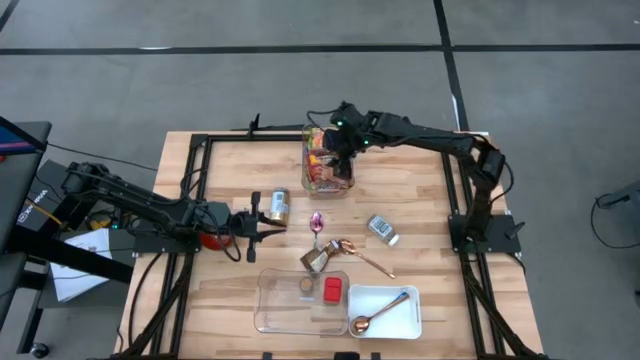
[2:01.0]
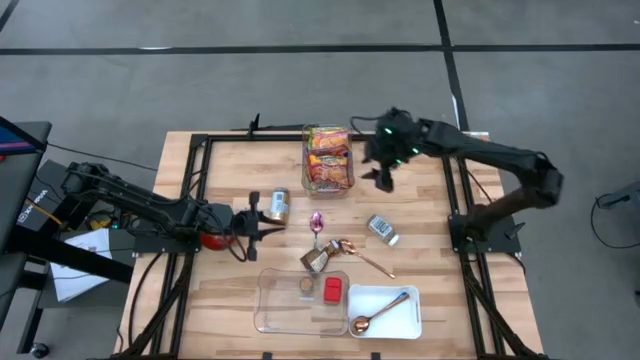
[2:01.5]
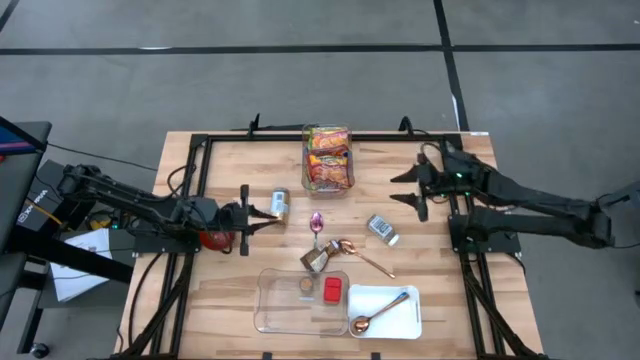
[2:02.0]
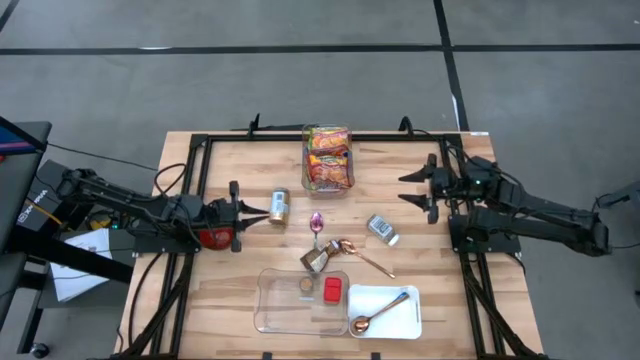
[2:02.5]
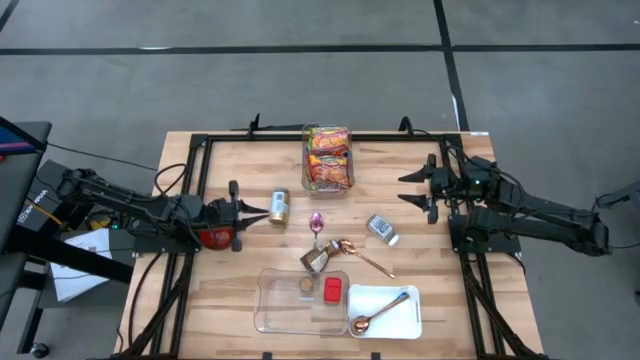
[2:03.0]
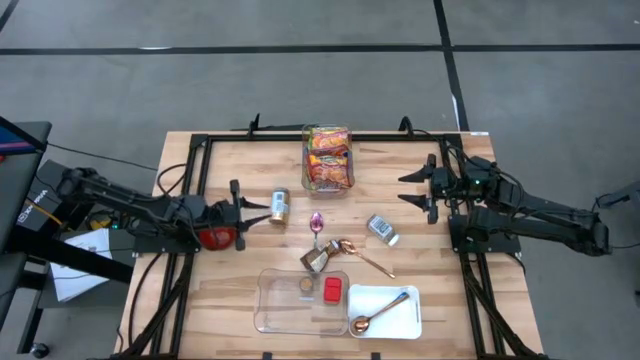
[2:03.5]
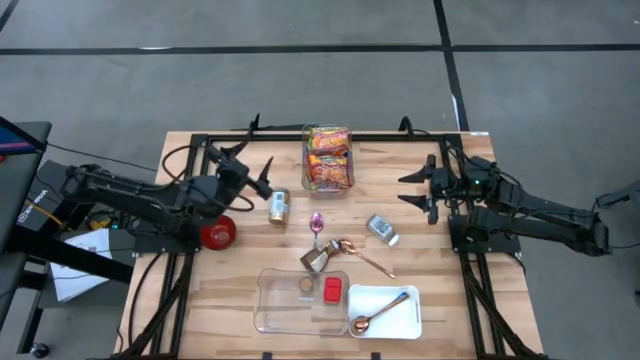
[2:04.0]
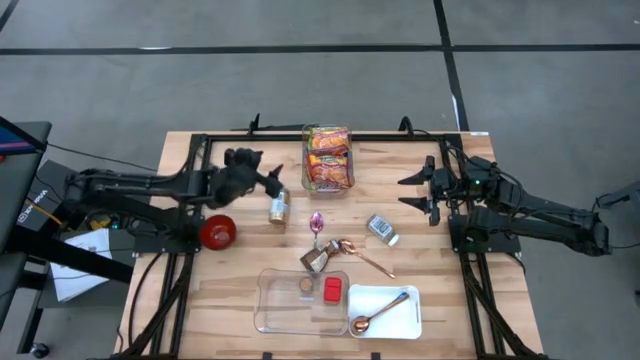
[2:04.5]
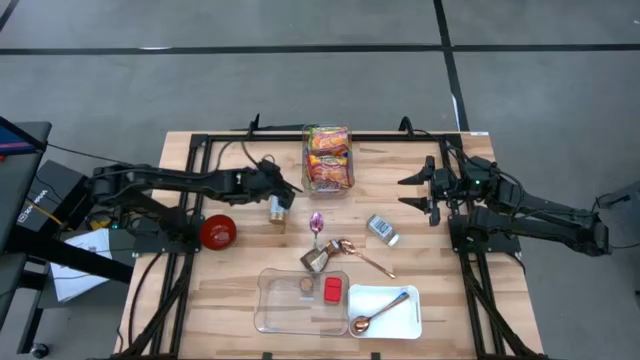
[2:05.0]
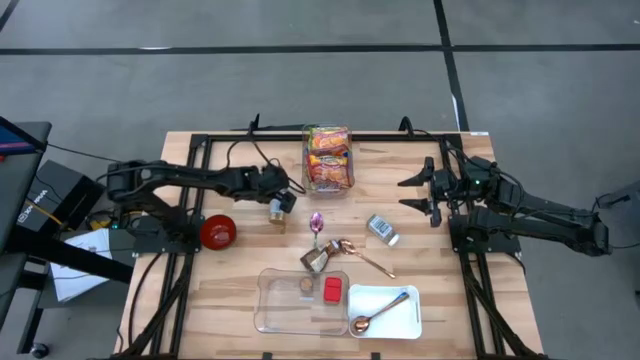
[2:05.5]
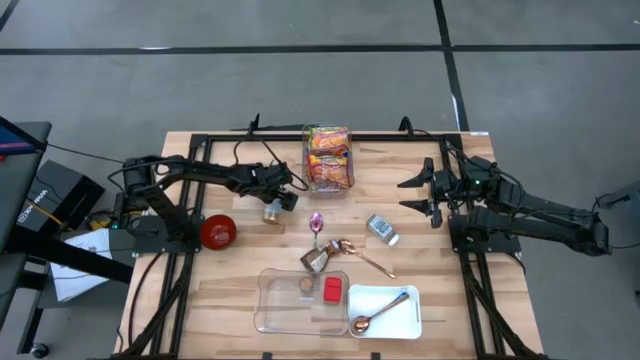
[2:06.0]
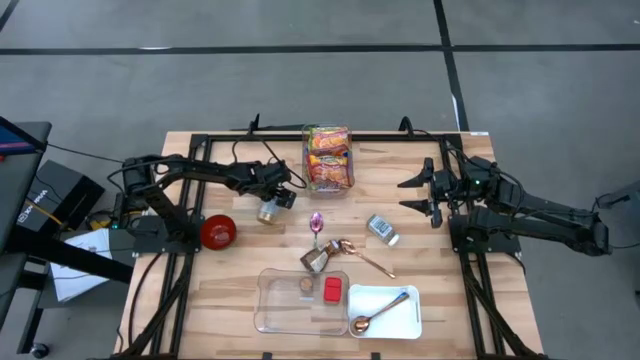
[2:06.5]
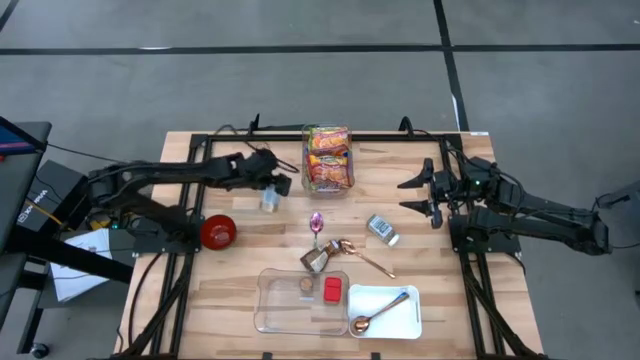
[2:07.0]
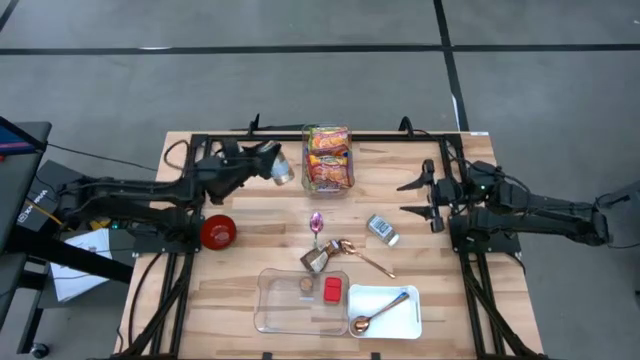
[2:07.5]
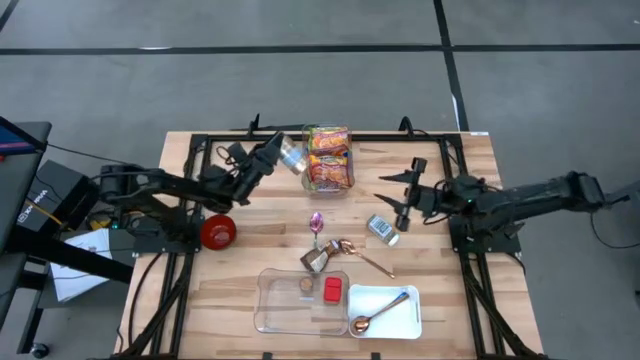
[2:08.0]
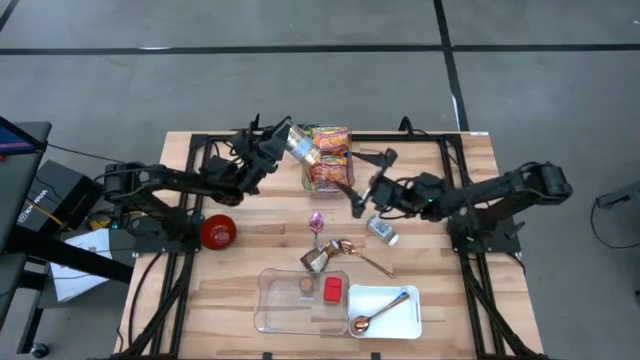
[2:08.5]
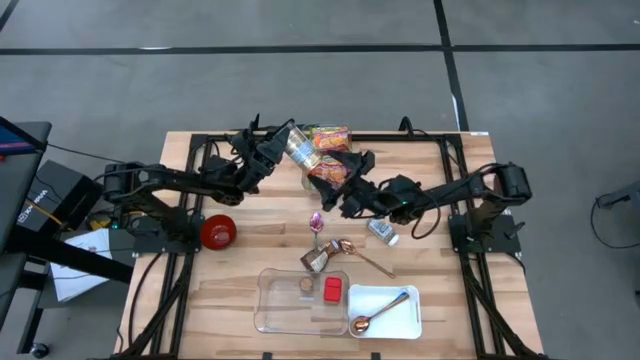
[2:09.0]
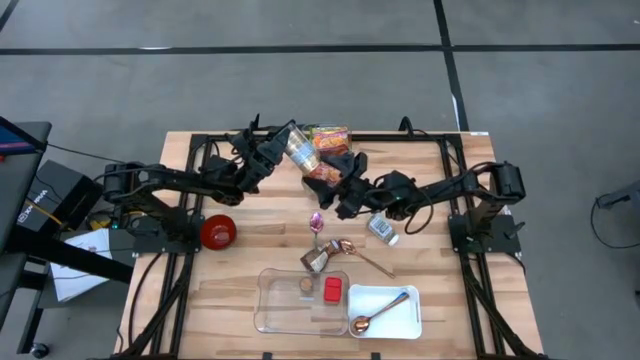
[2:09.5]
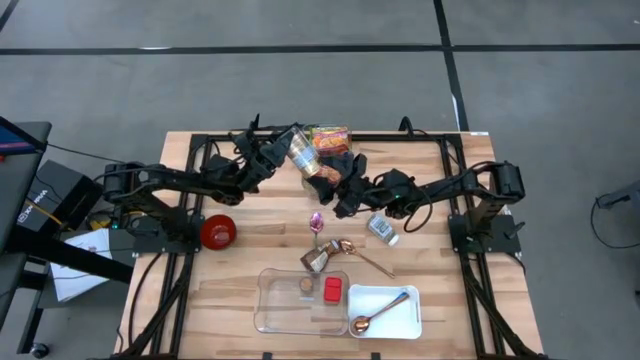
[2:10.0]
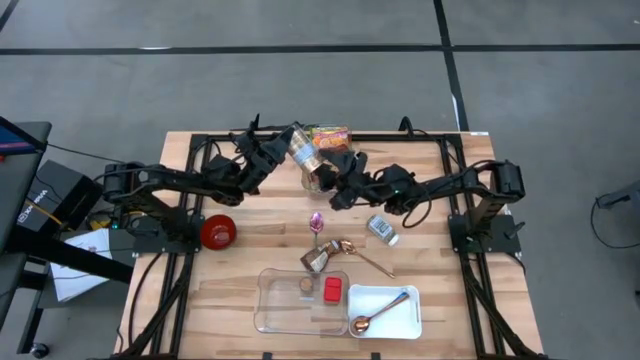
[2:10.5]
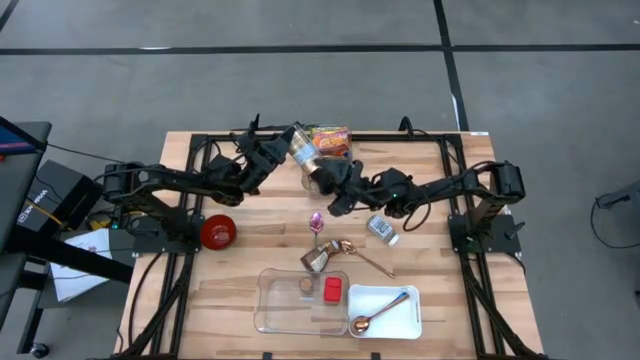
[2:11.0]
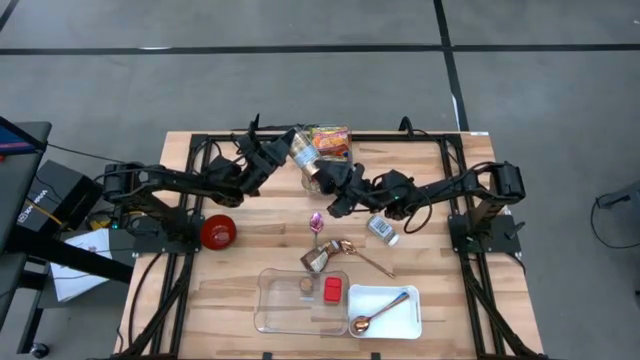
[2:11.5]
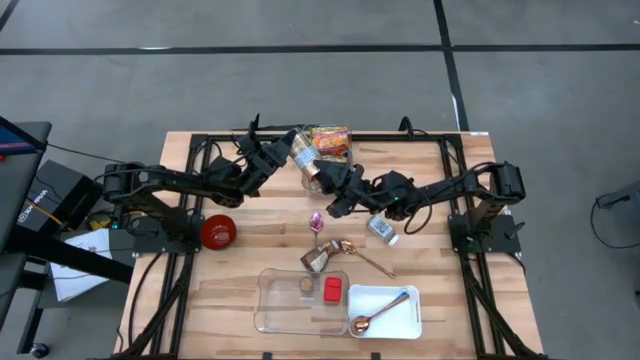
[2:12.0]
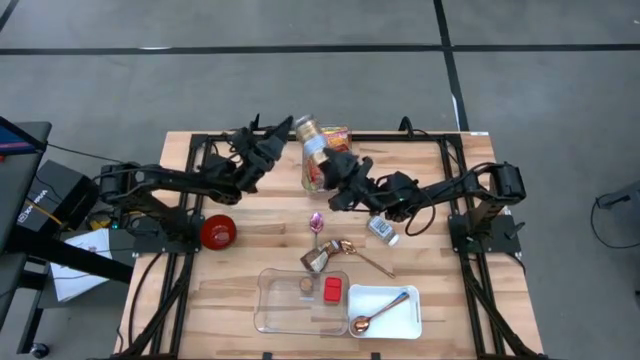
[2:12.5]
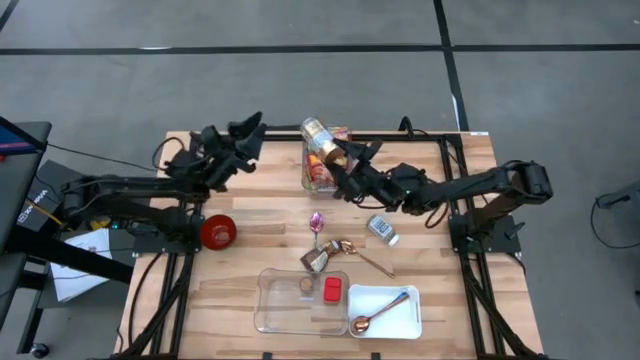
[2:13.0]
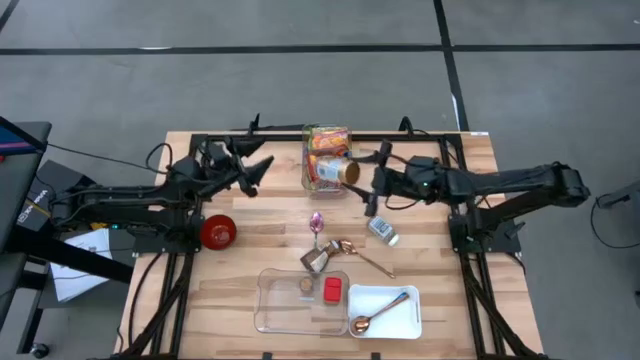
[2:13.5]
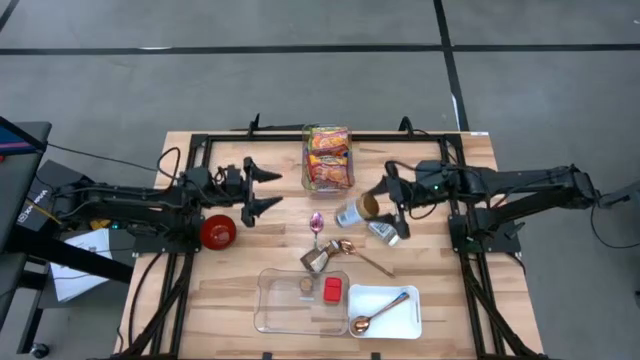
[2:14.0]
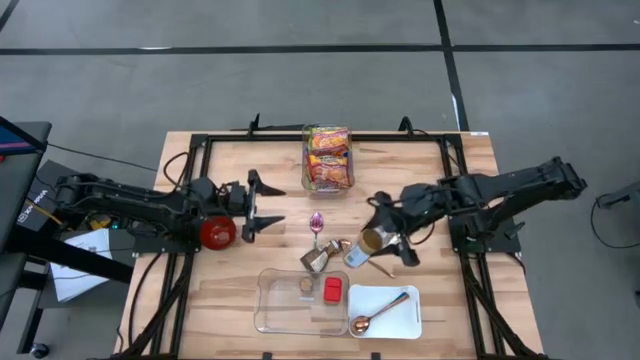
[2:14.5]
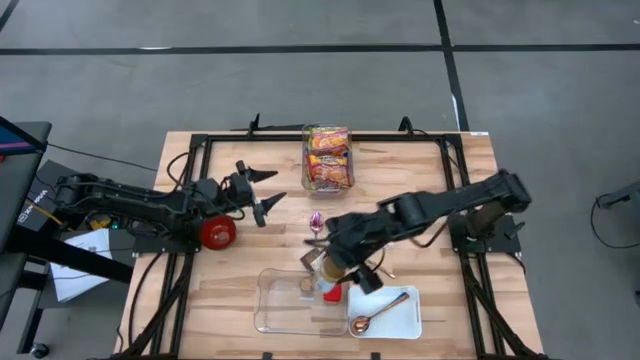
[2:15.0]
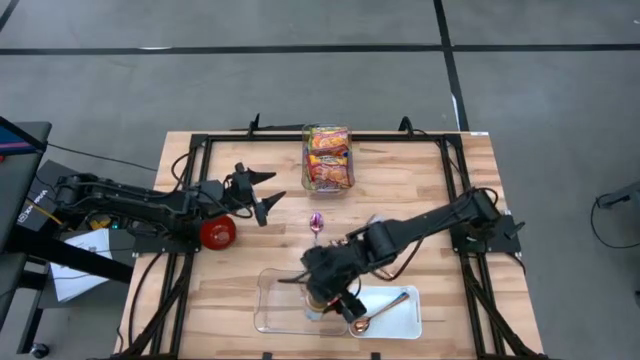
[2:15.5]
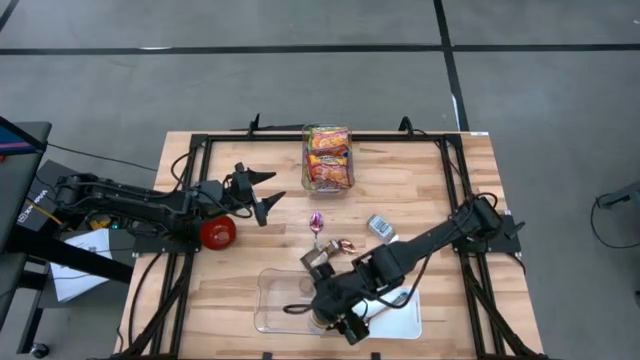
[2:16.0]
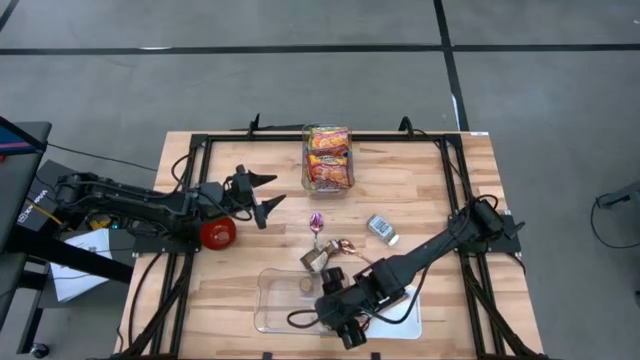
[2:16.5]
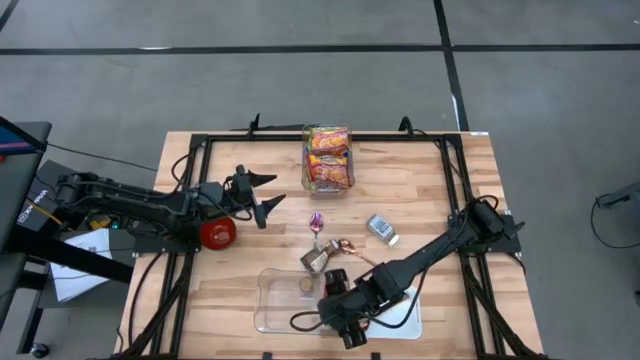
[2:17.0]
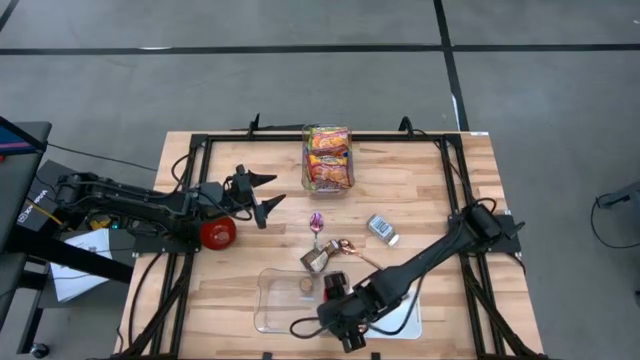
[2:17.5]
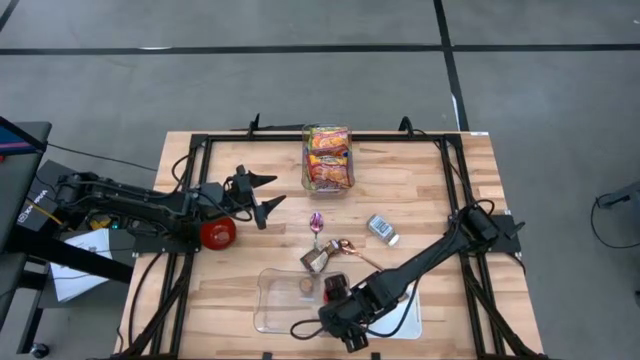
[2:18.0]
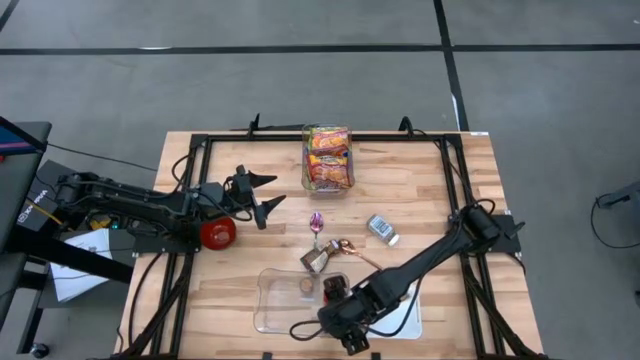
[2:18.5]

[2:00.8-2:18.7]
Task: Pick & Place Food Item
Put the gold seasoning bottle into the bottom transparent bin

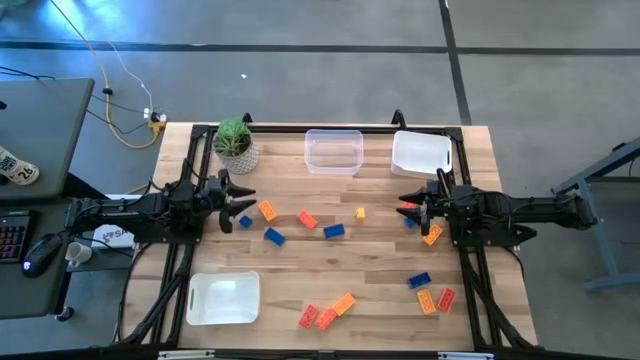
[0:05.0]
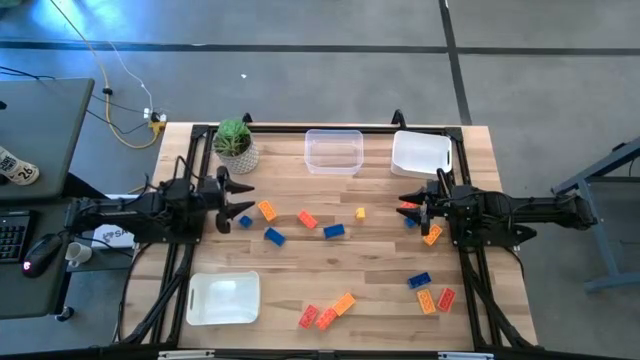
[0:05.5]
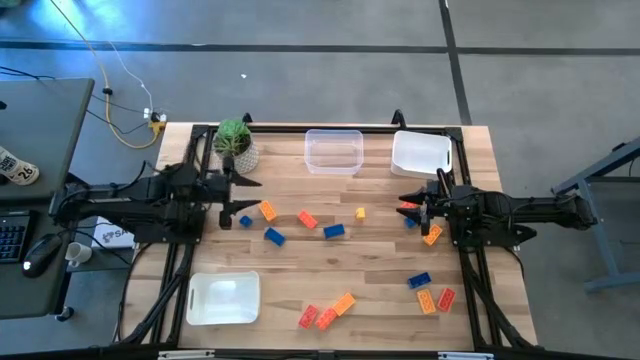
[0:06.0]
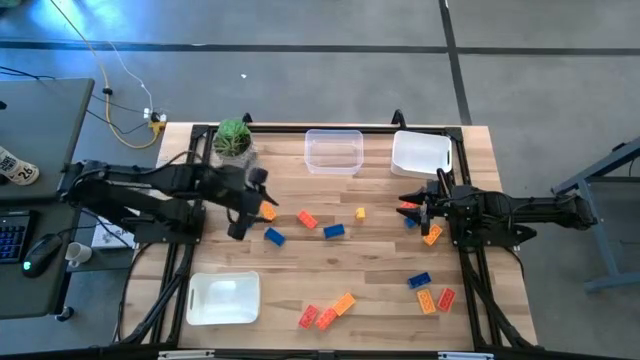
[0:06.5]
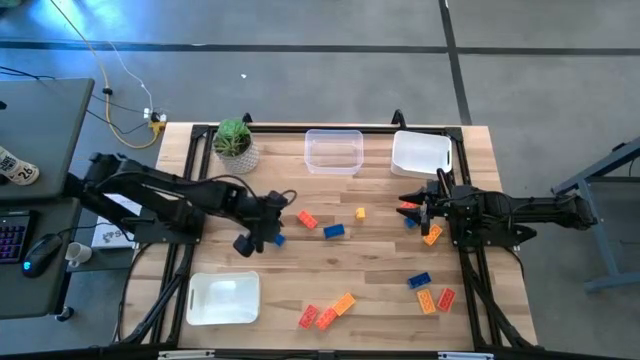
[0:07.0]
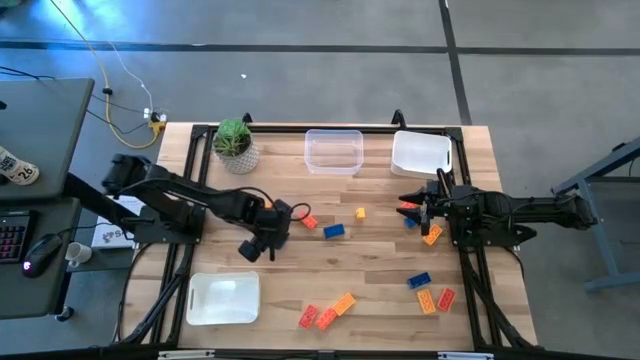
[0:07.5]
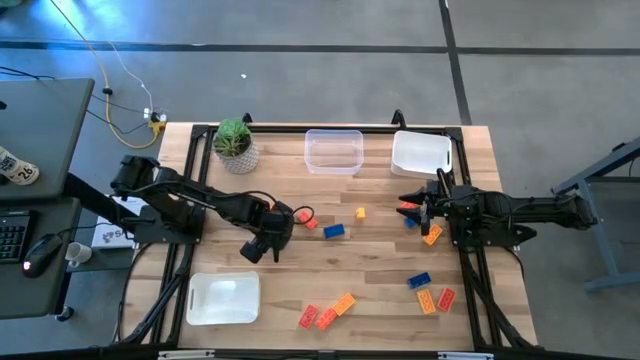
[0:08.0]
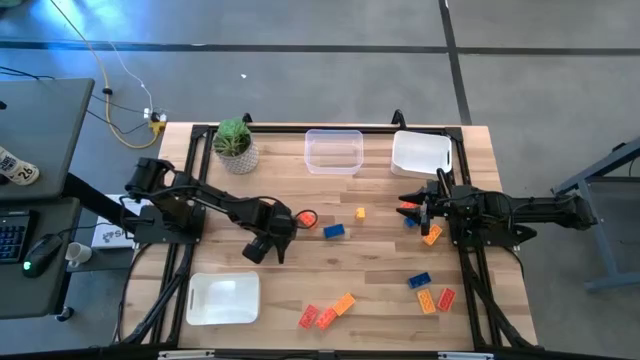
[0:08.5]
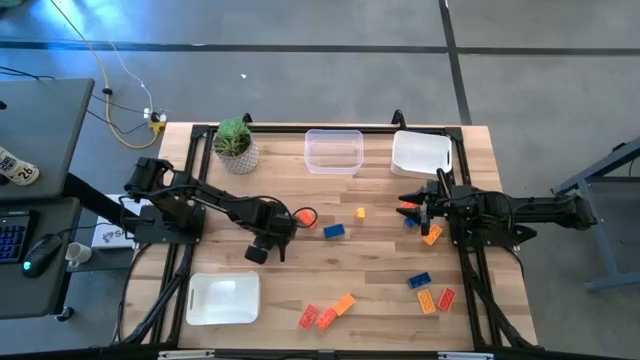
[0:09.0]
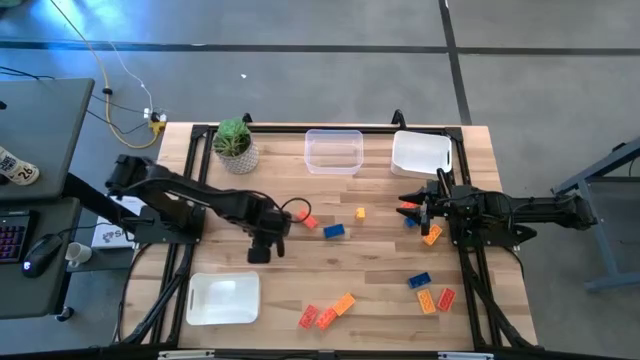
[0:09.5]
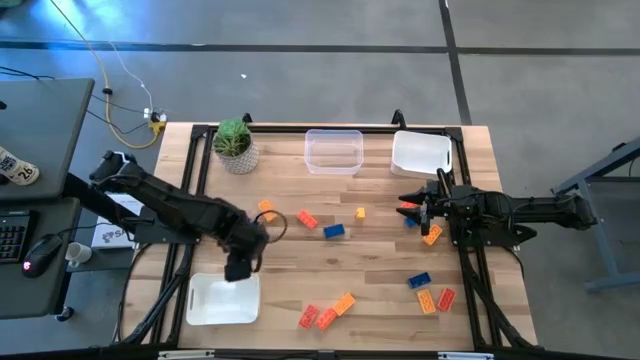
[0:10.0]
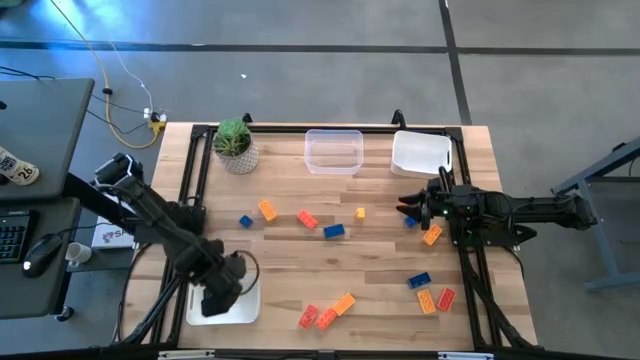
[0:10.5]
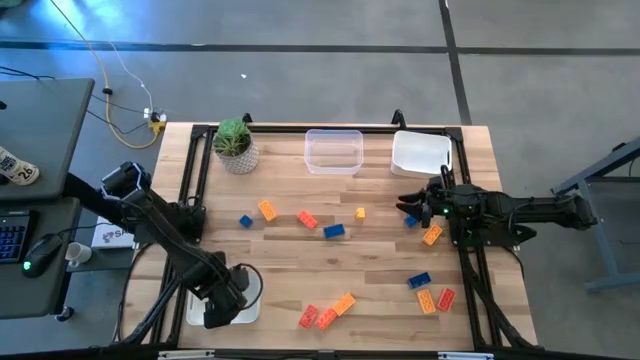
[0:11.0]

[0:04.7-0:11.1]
Task: Sort & place blocks by color
Put the blue game piece into the bottom white bin
